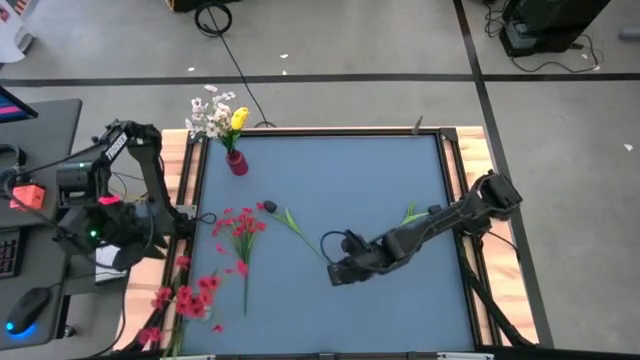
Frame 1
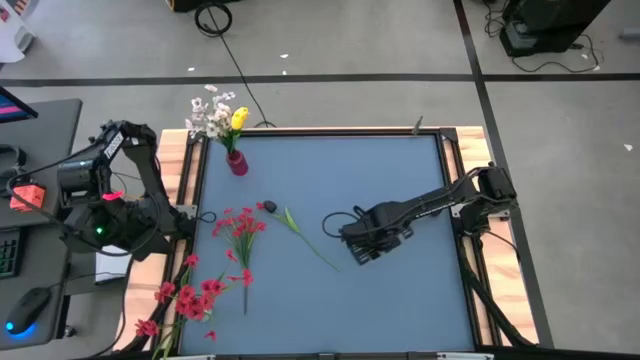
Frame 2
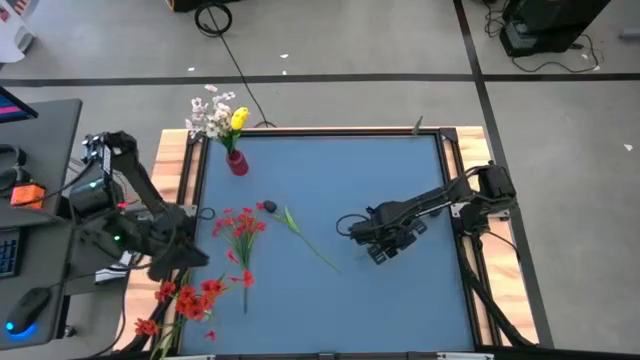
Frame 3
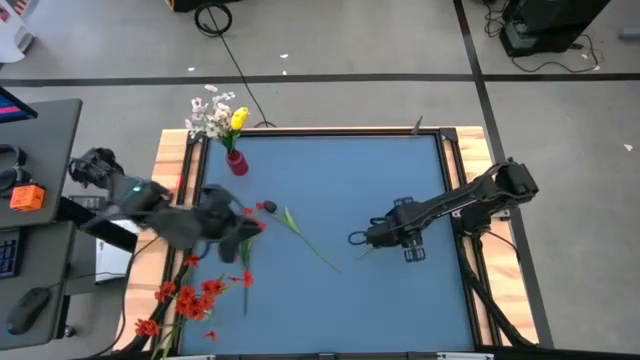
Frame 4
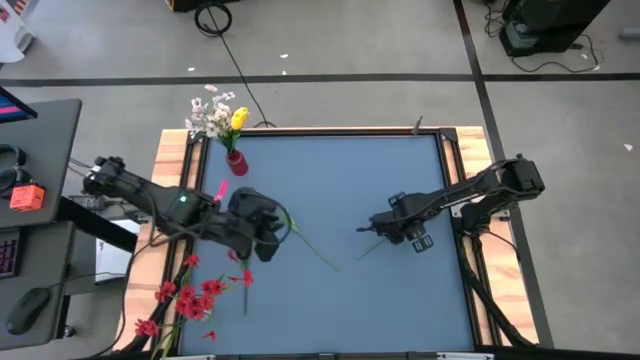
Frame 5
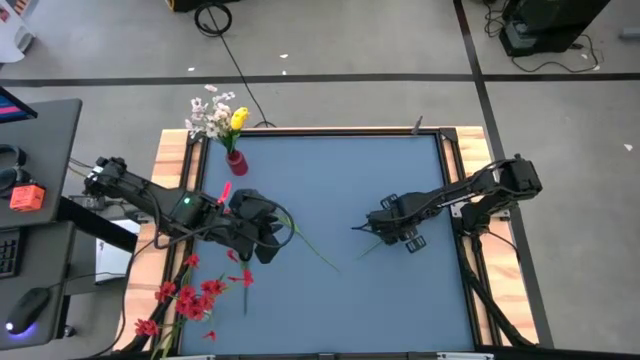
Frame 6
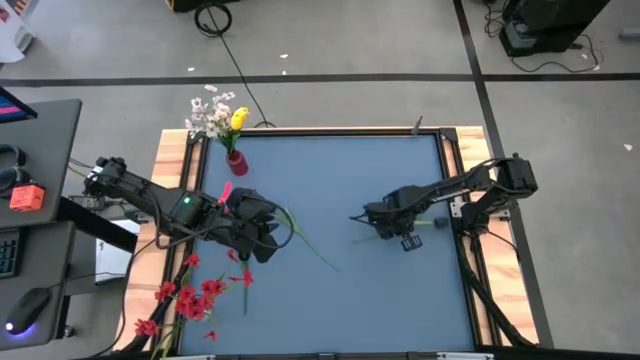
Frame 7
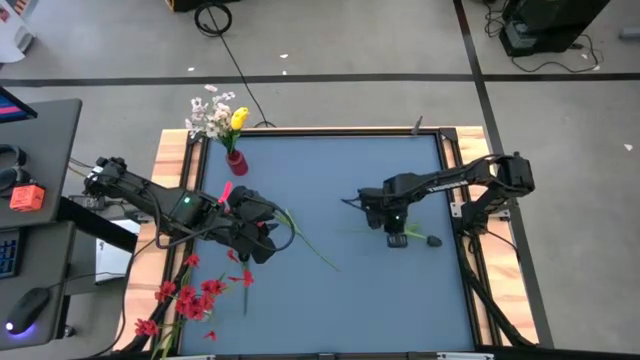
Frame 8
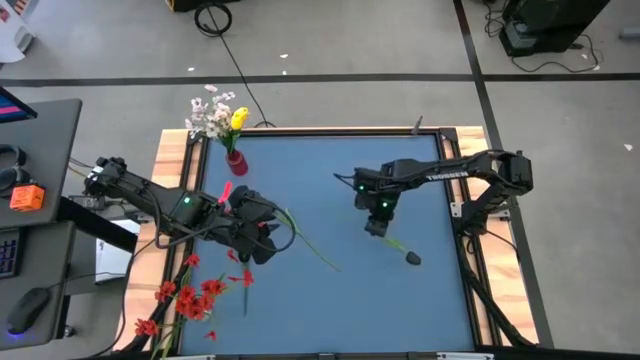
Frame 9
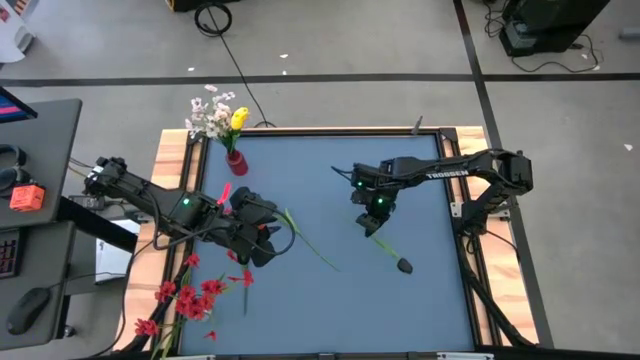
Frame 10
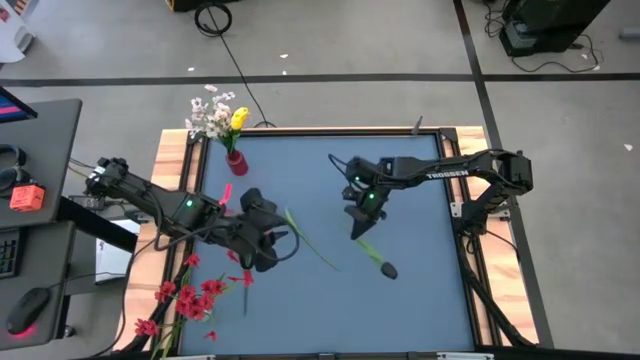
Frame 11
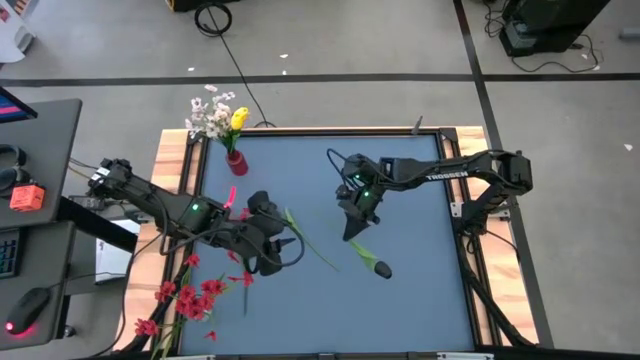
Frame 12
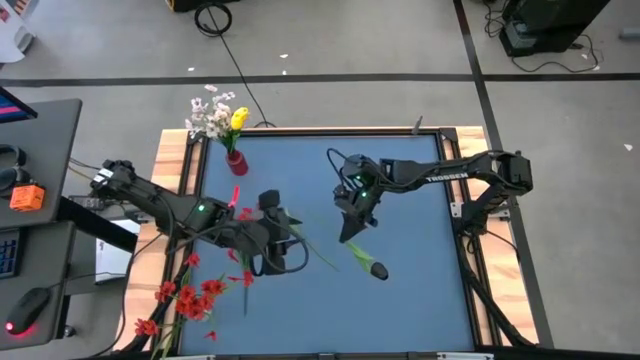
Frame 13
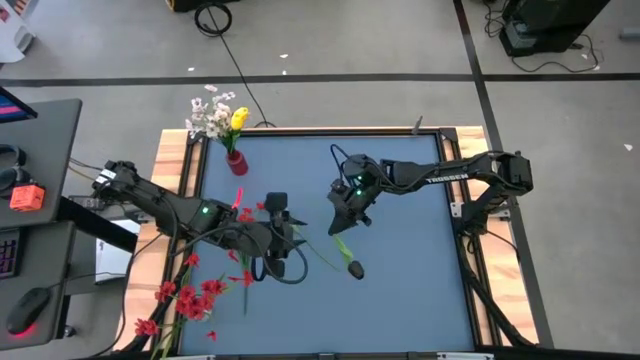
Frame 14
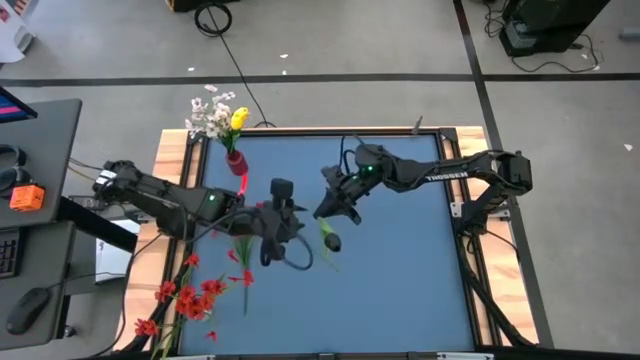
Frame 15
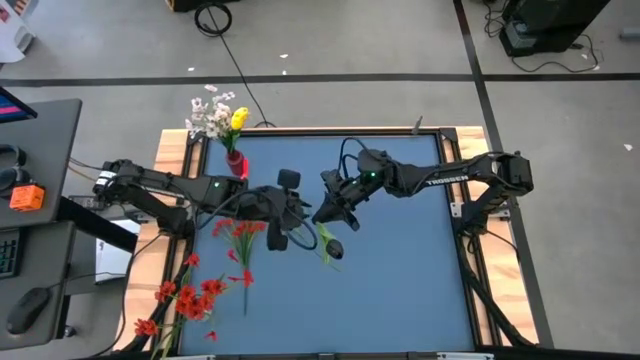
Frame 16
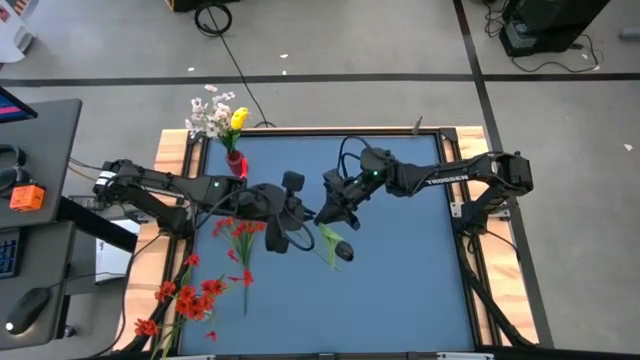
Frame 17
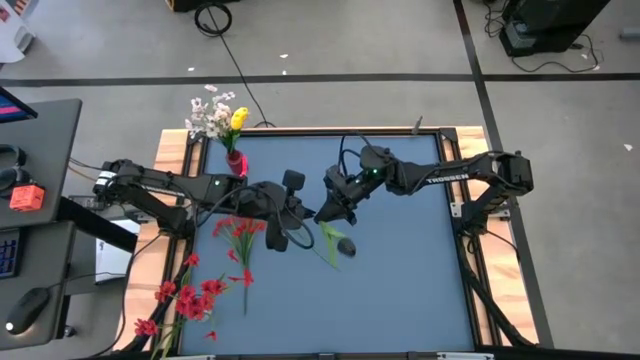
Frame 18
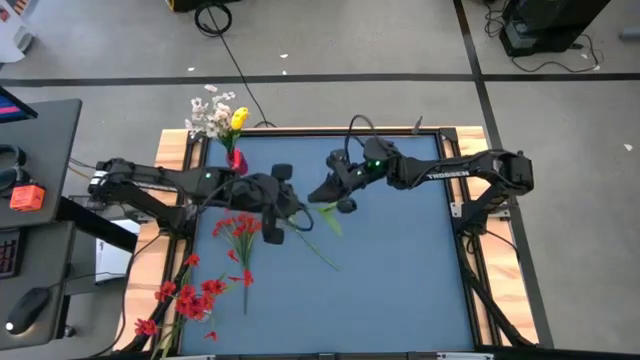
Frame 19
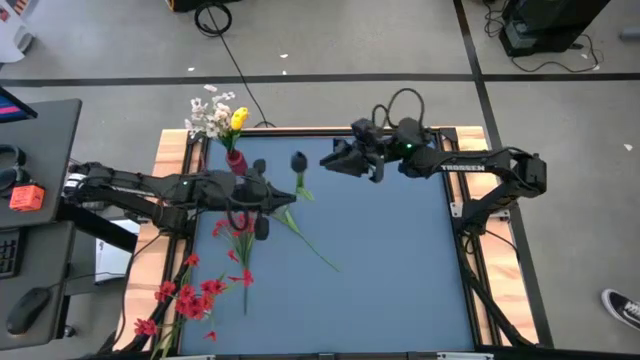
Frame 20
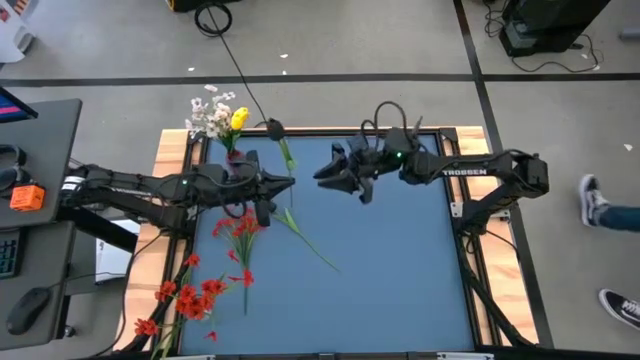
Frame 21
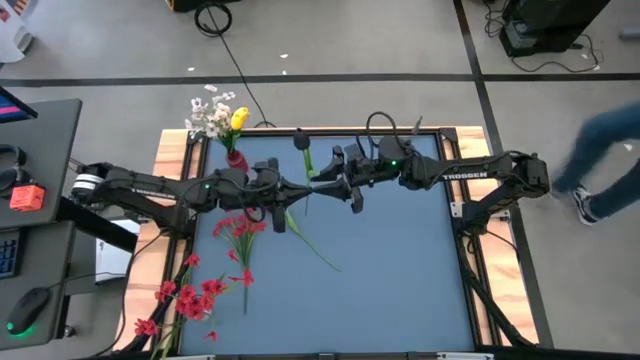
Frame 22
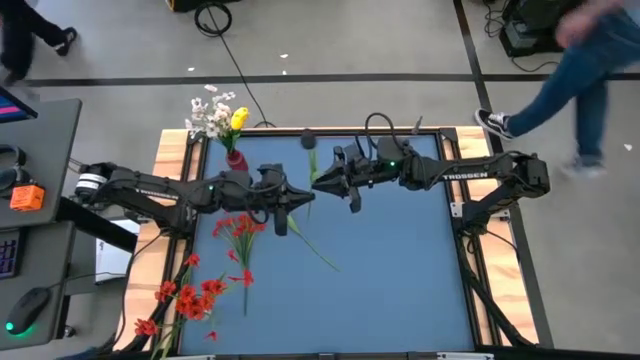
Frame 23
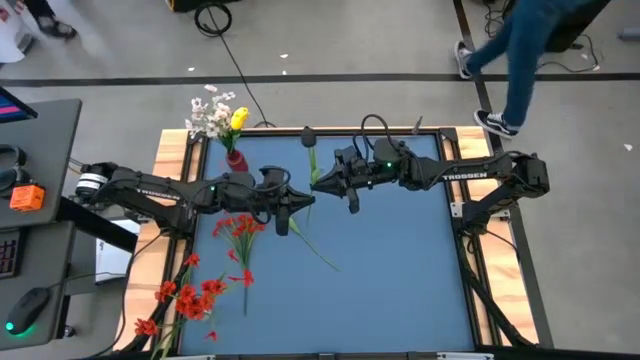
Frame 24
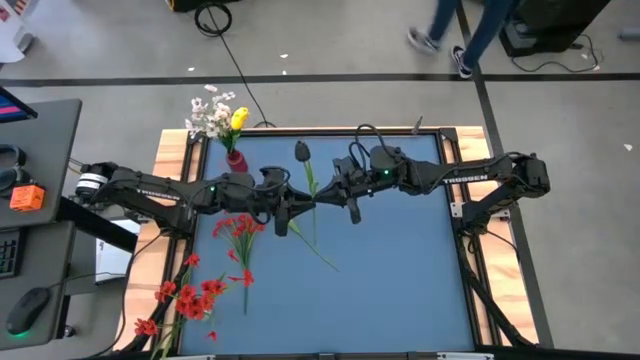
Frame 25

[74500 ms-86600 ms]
Task: Sort flowers into vase by color
Put the right black tulip into the transparent vase

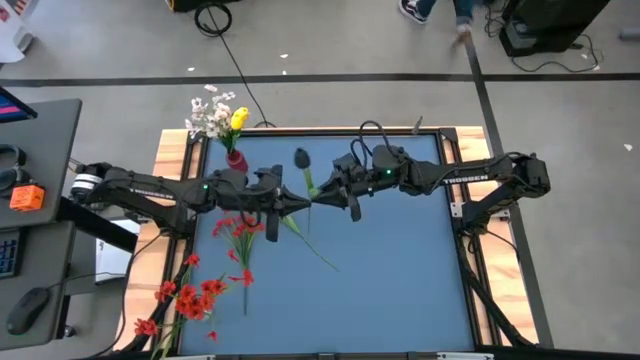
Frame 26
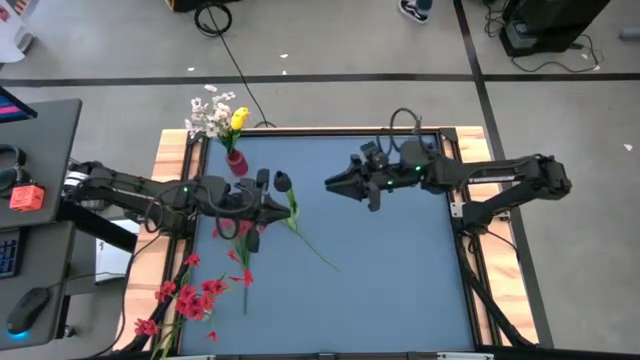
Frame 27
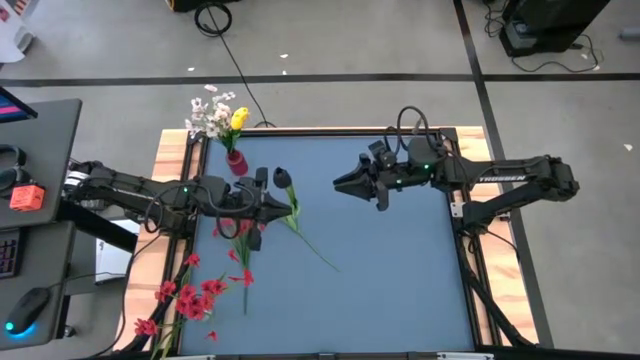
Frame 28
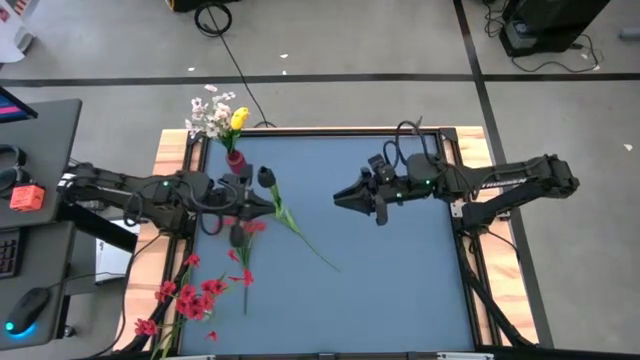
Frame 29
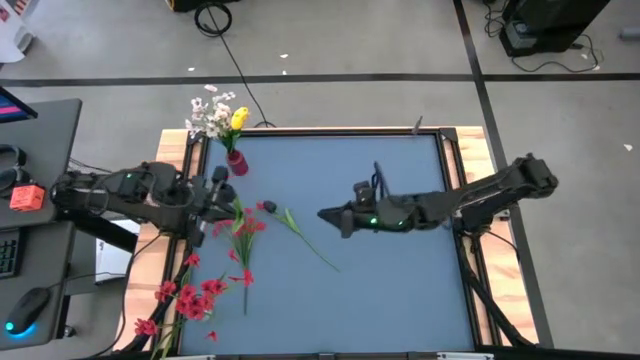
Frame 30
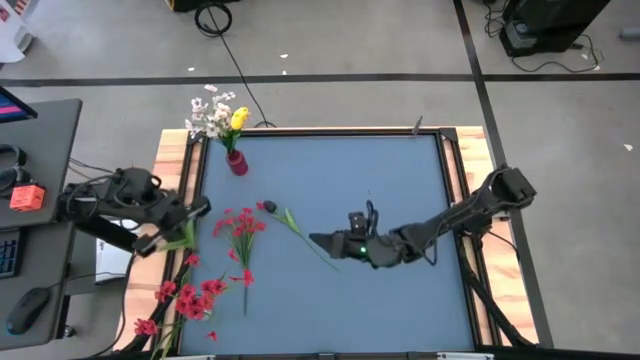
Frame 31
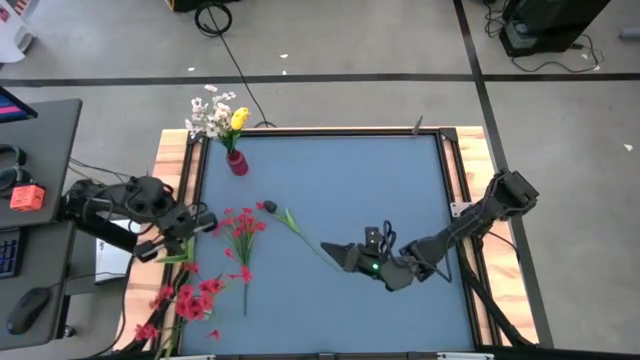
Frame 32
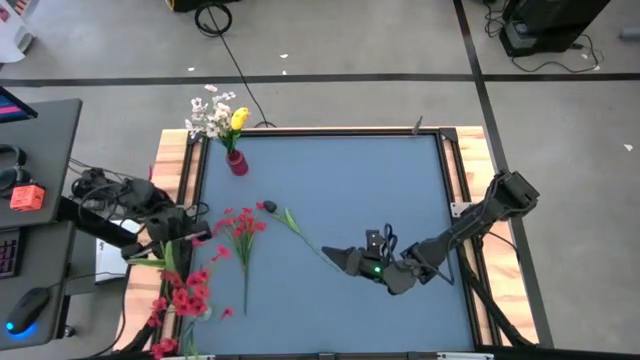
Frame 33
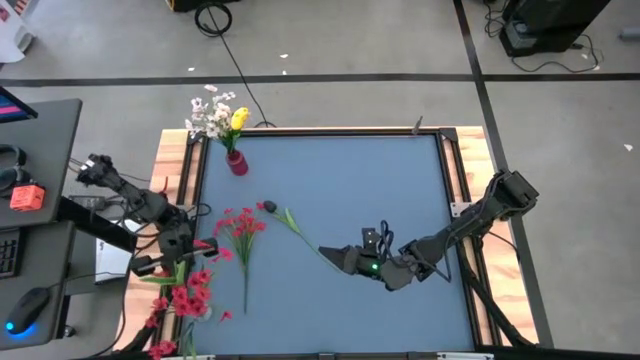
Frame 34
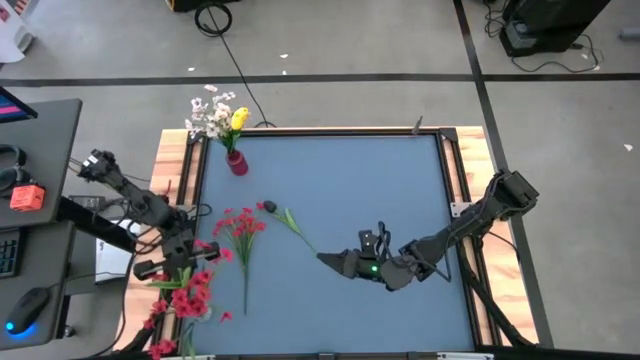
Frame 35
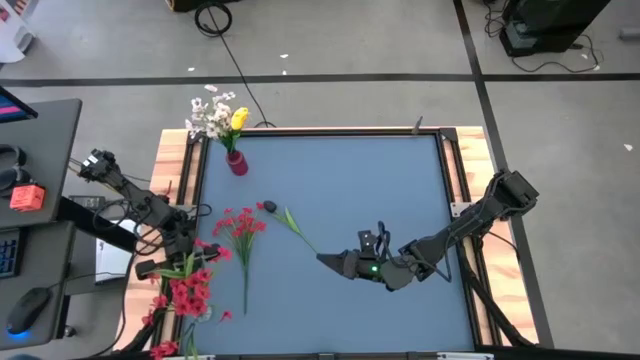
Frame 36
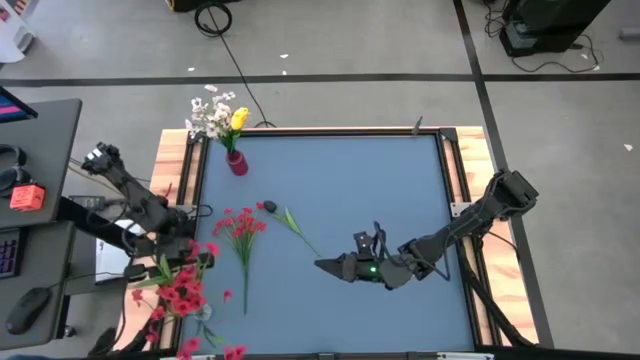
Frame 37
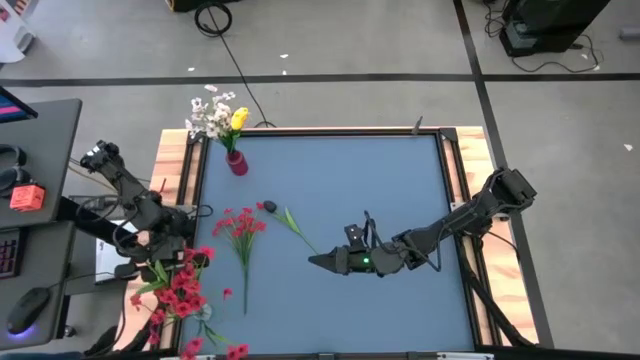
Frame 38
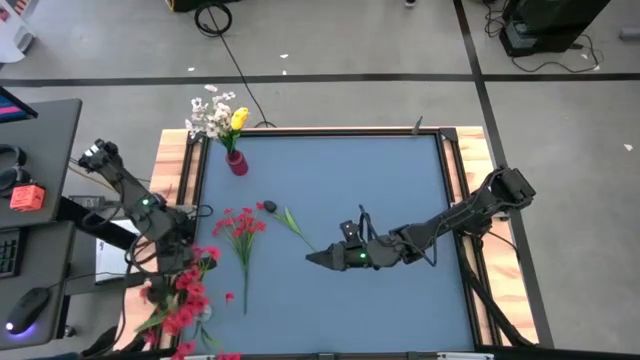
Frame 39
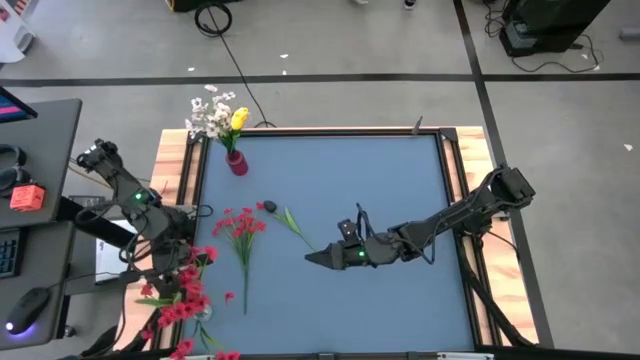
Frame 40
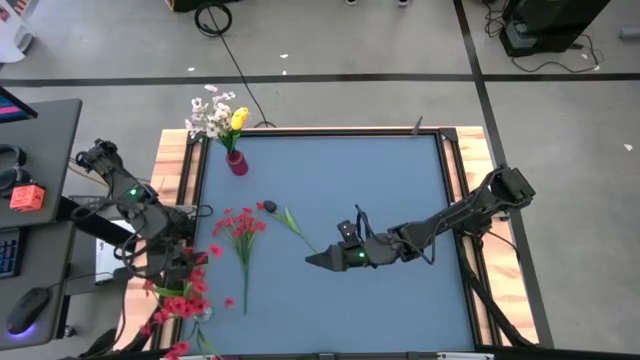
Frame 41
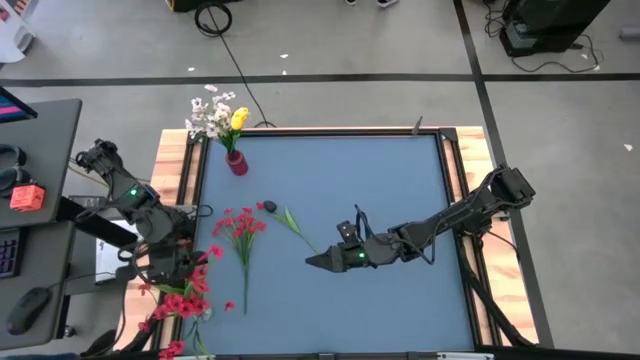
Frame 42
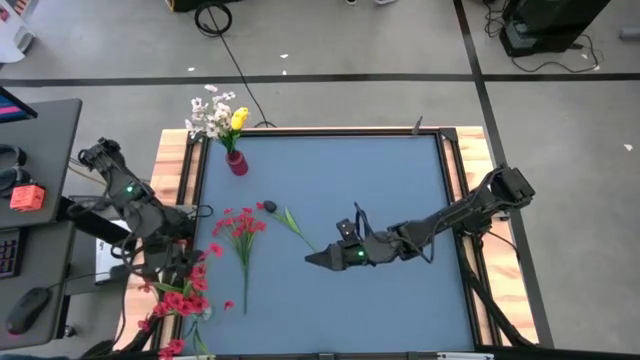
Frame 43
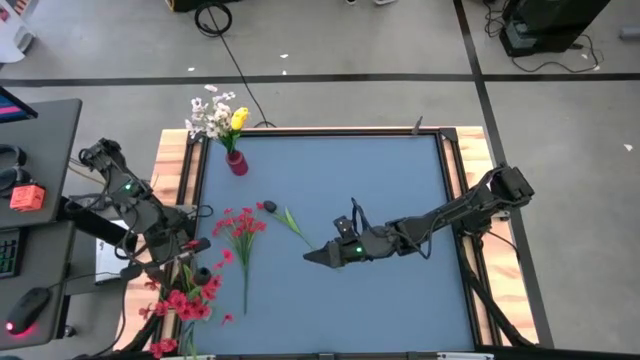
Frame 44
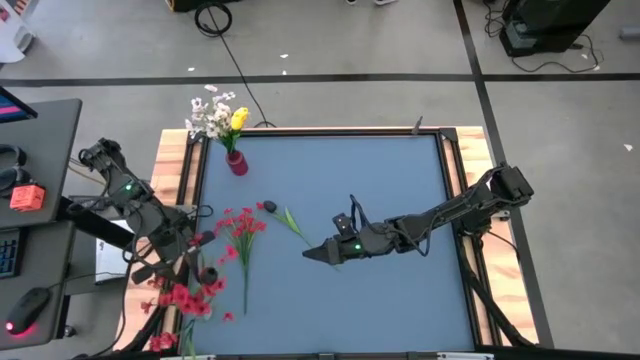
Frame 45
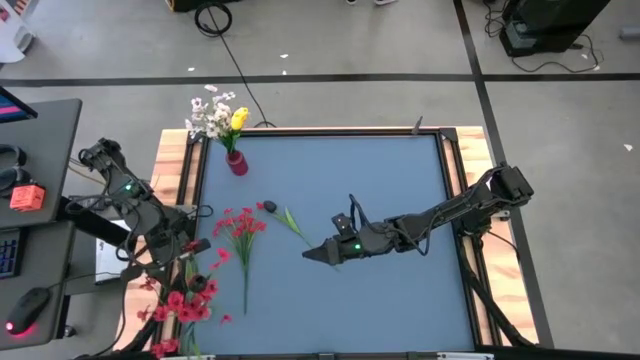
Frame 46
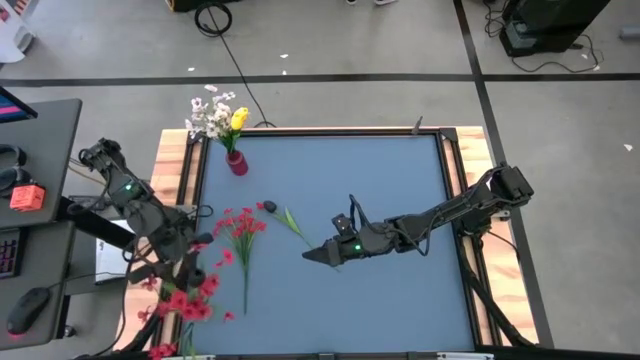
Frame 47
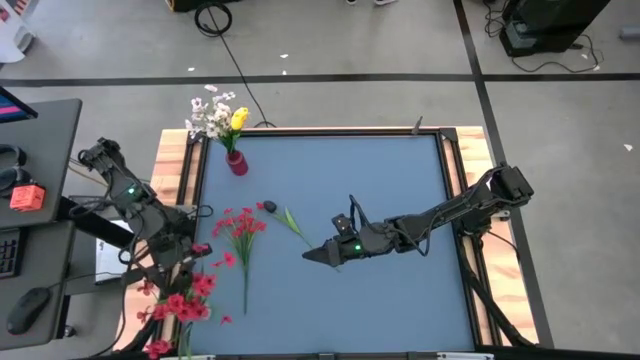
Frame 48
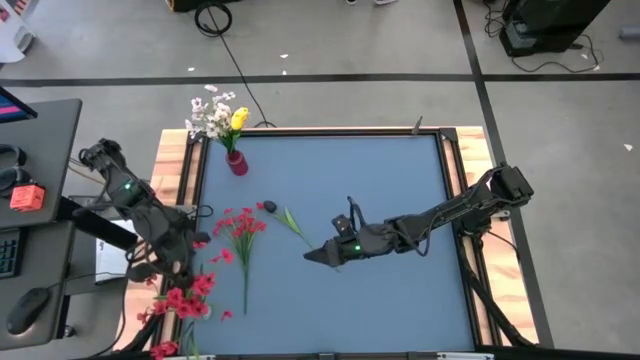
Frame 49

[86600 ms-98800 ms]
Put the right black tulip into the transparent vase
